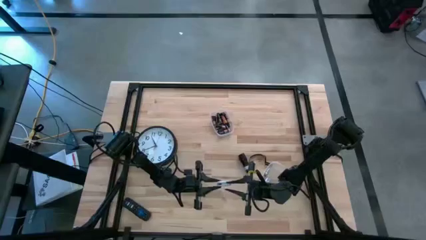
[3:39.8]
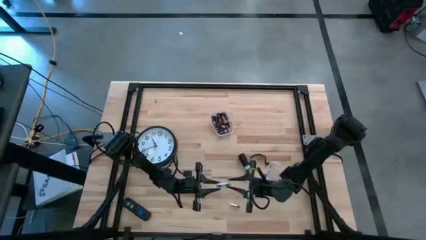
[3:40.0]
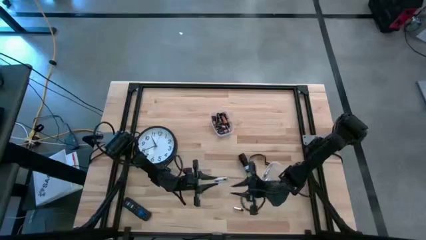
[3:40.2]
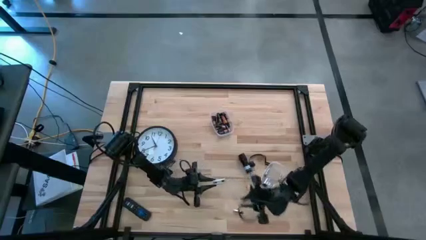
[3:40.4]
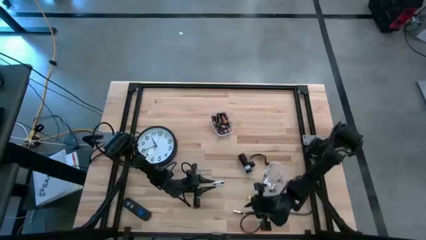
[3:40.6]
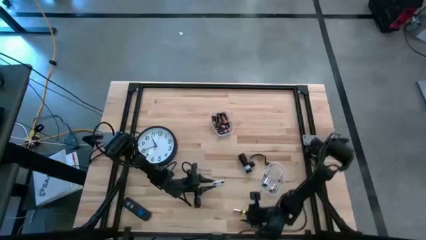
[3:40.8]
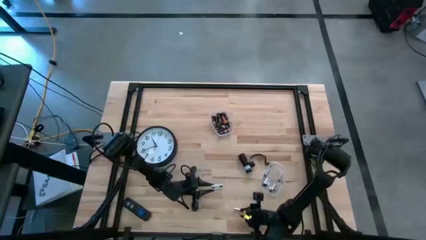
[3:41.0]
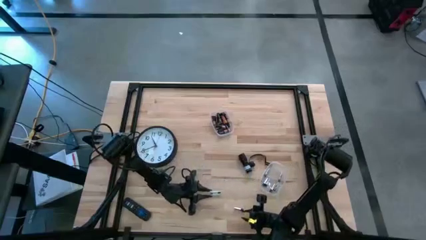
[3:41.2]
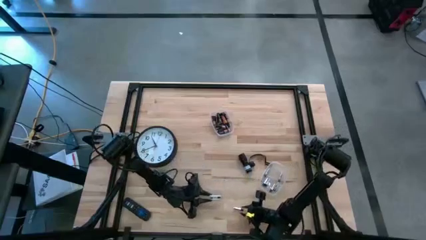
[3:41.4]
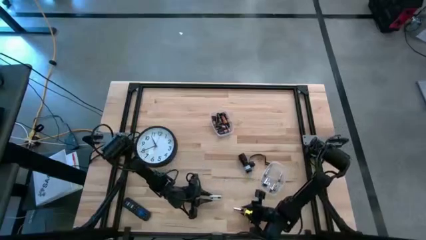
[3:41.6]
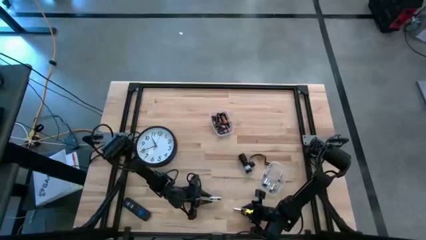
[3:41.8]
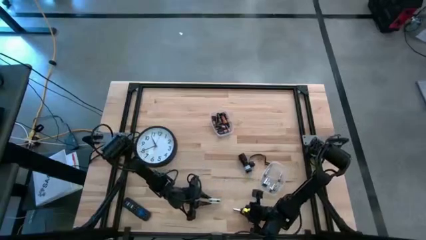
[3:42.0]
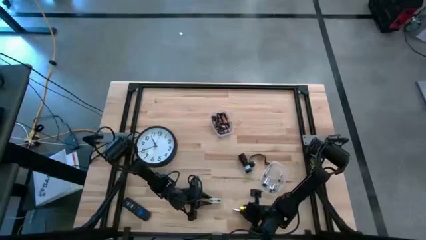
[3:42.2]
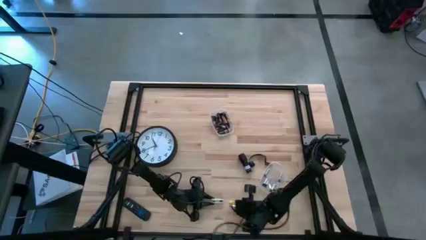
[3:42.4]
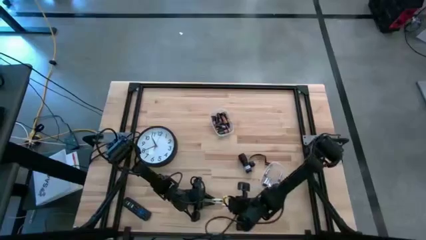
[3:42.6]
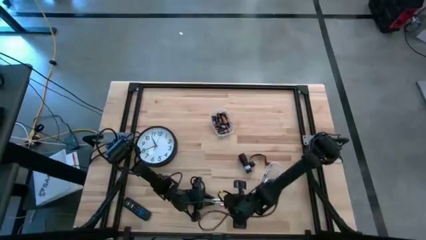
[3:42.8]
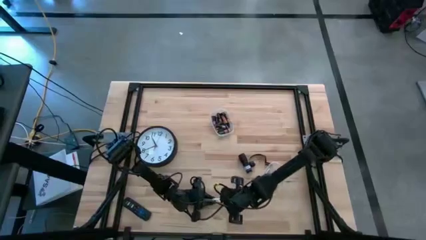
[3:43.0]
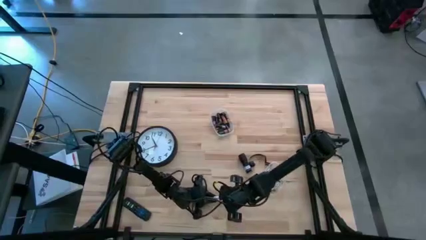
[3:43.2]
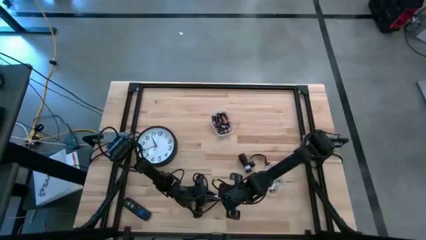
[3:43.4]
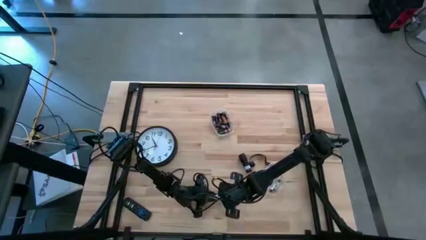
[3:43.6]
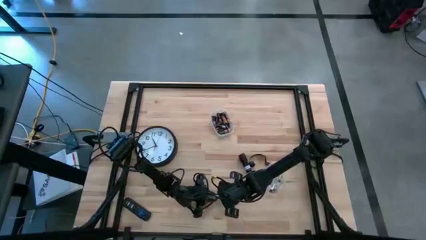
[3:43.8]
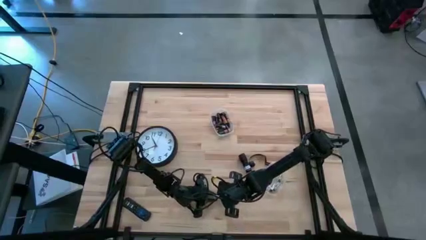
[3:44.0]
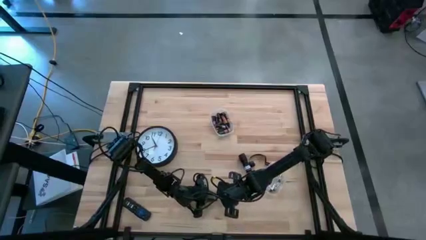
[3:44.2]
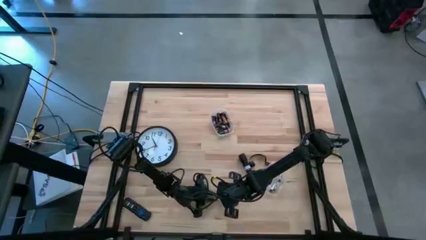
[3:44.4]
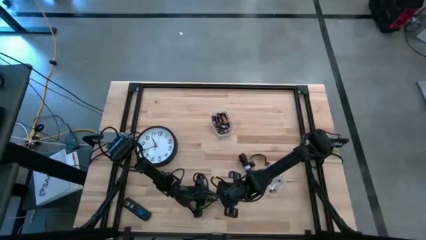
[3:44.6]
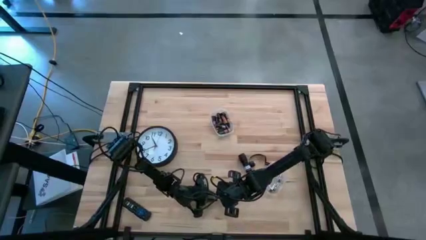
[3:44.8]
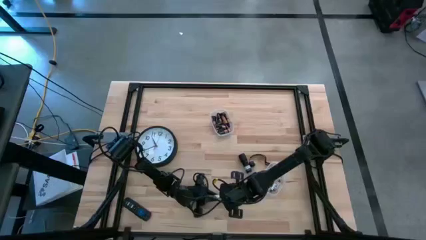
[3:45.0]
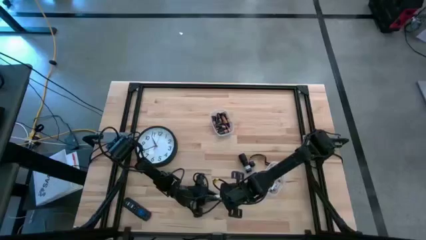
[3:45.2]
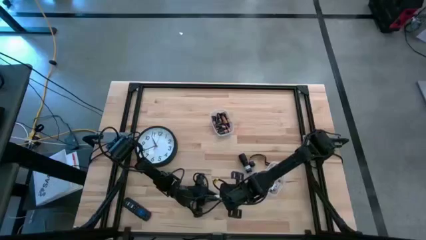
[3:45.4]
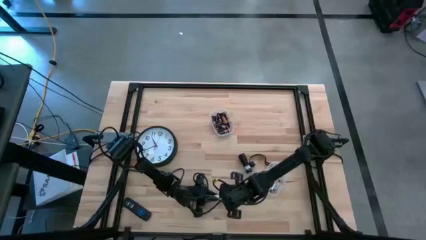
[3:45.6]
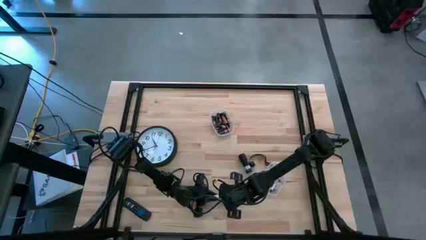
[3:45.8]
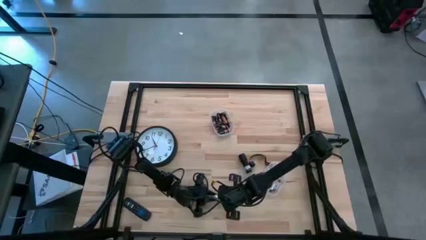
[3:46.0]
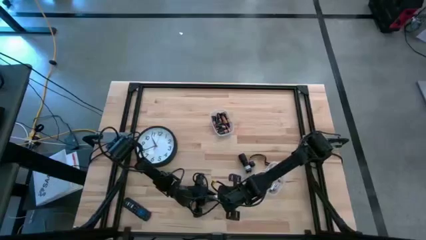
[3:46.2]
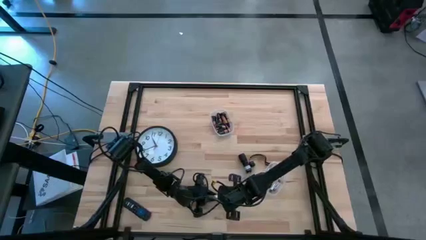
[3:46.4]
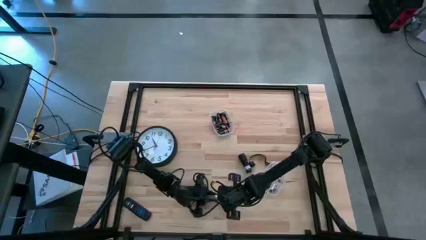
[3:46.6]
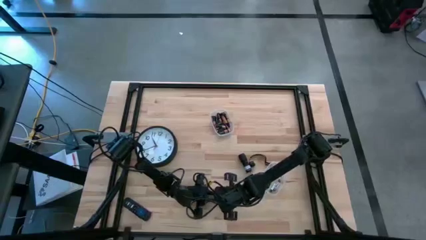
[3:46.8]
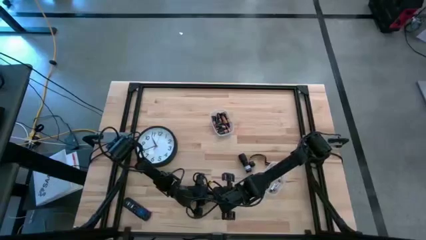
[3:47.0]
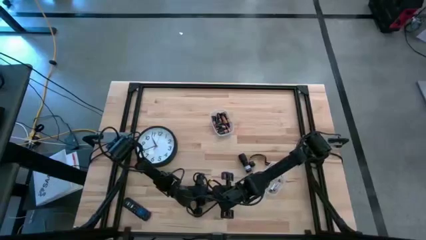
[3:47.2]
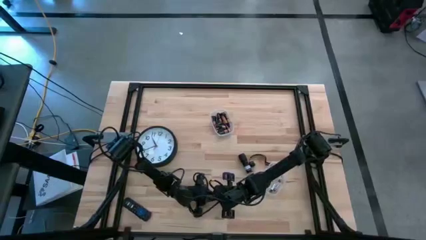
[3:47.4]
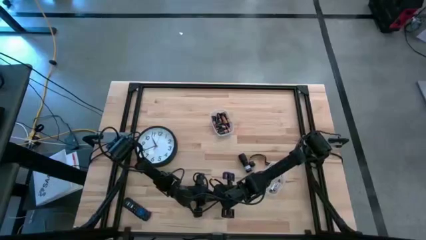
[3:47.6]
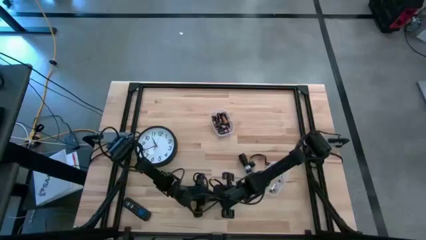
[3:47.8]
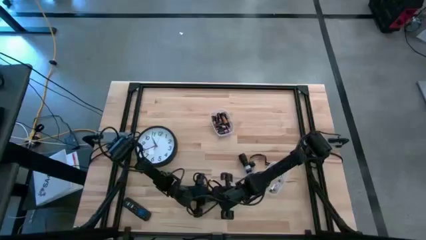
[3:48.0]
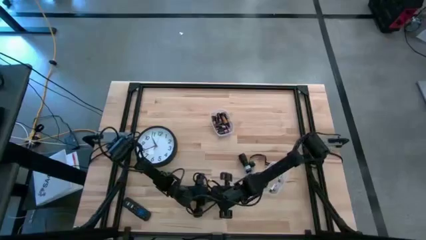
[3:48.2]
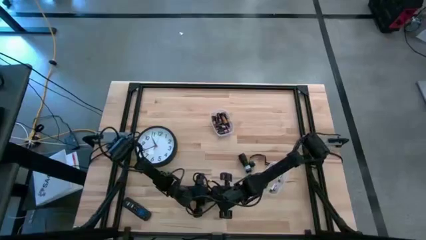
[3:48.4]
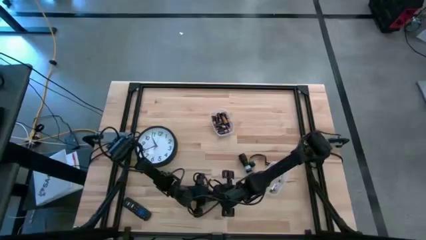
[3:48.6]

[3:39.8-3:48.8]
Task: Insert battery
Insert the silver battery into the battery holder

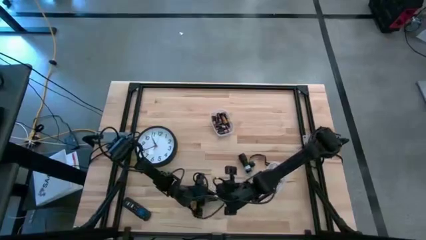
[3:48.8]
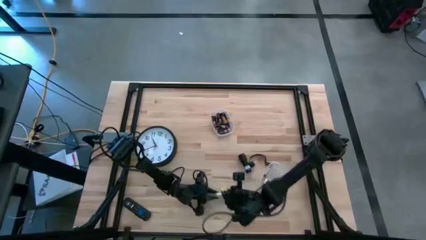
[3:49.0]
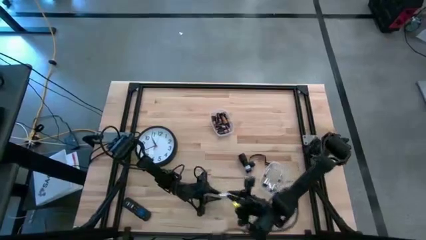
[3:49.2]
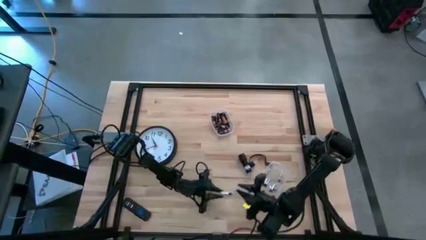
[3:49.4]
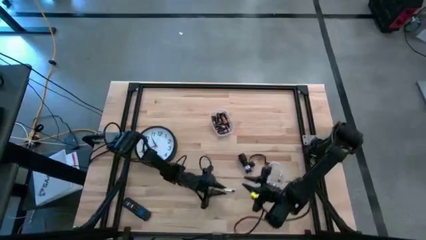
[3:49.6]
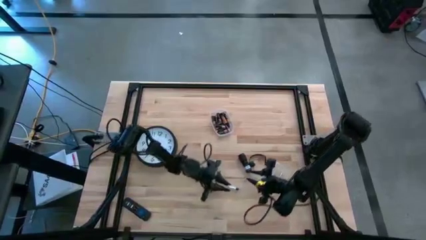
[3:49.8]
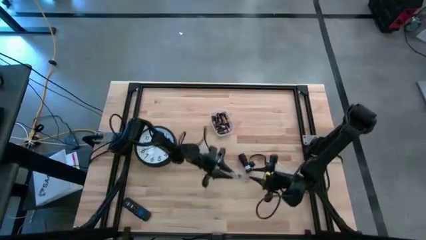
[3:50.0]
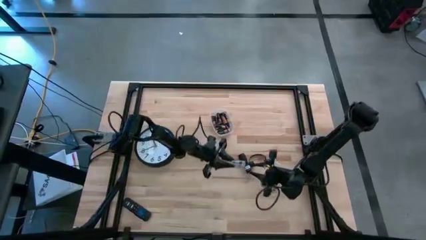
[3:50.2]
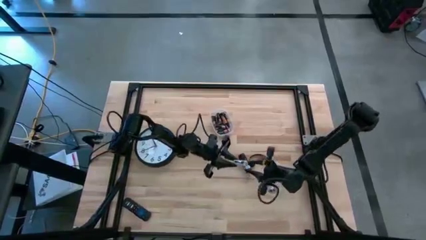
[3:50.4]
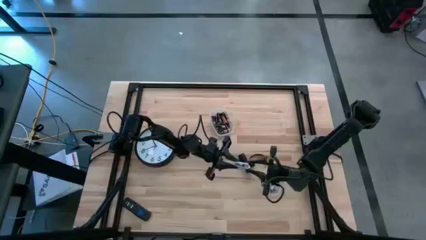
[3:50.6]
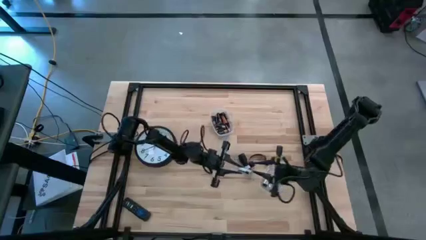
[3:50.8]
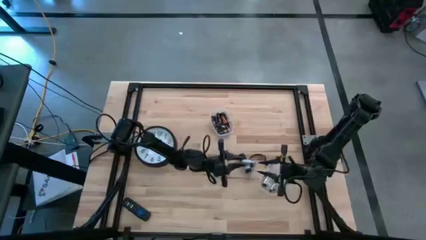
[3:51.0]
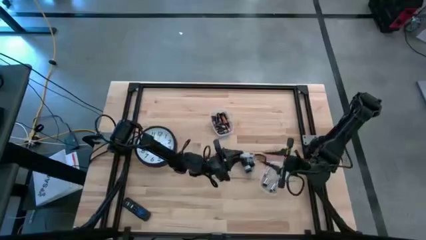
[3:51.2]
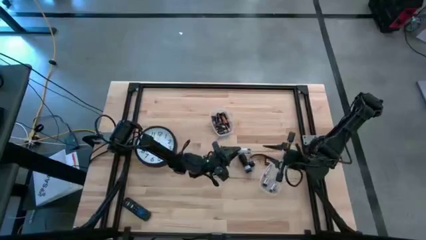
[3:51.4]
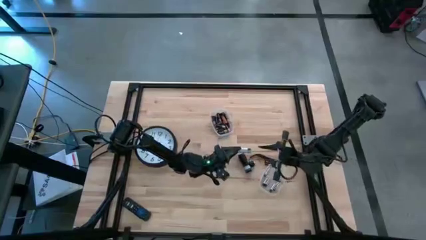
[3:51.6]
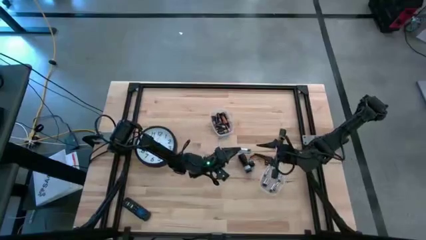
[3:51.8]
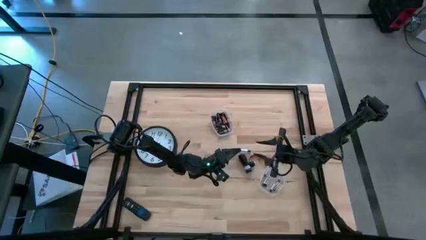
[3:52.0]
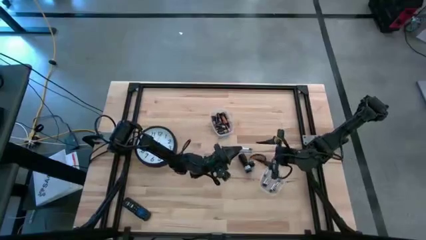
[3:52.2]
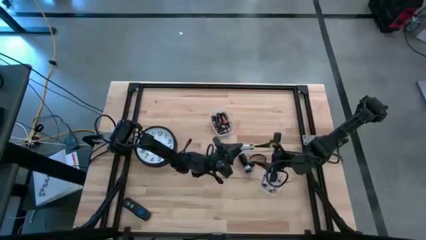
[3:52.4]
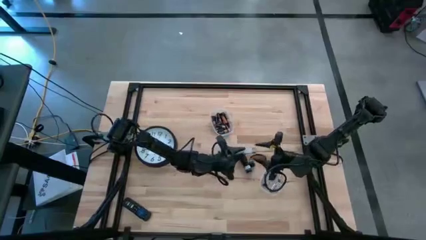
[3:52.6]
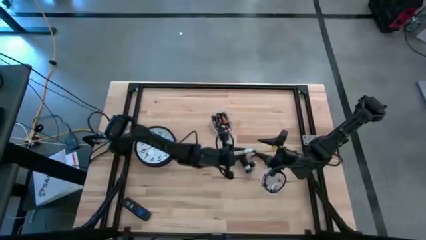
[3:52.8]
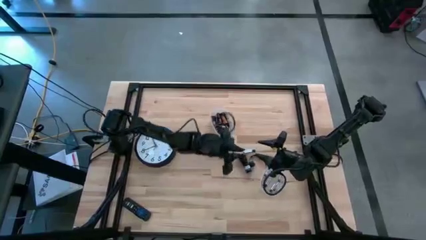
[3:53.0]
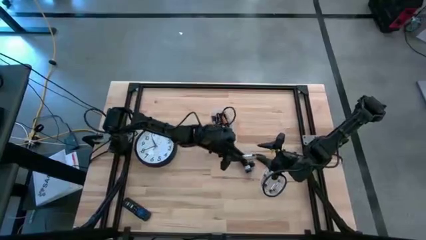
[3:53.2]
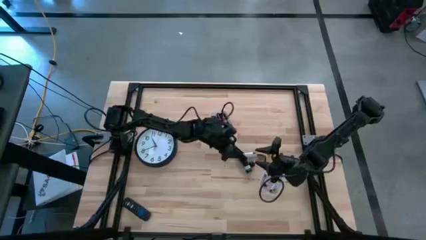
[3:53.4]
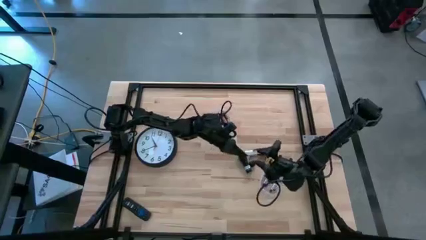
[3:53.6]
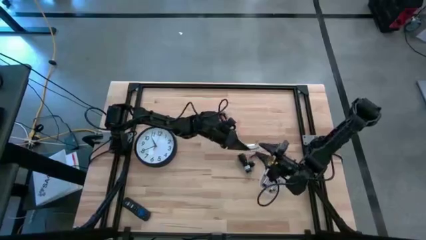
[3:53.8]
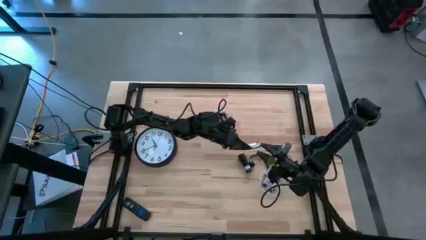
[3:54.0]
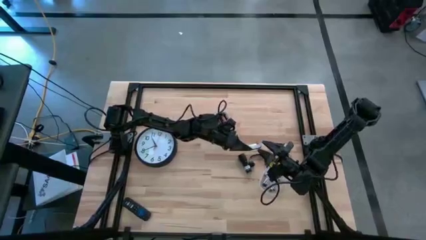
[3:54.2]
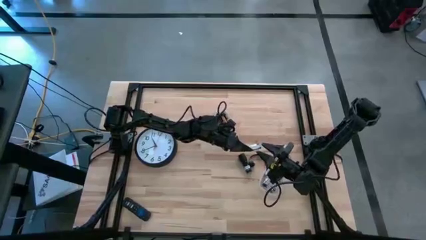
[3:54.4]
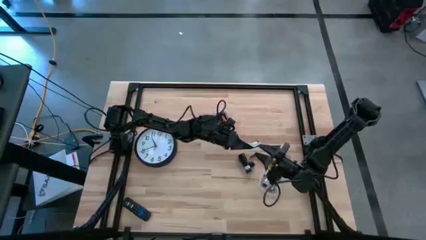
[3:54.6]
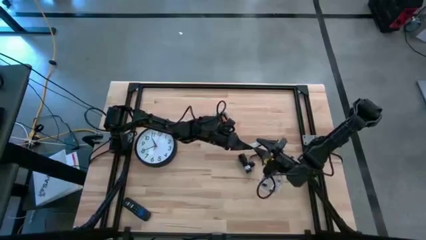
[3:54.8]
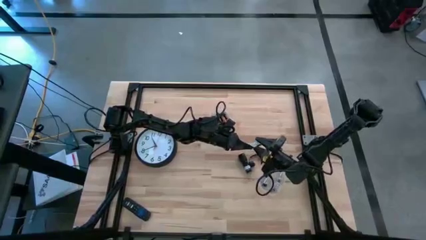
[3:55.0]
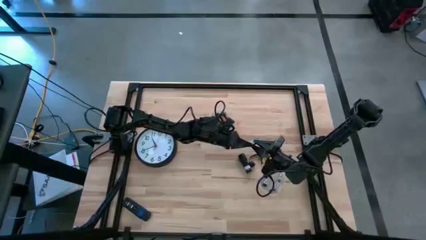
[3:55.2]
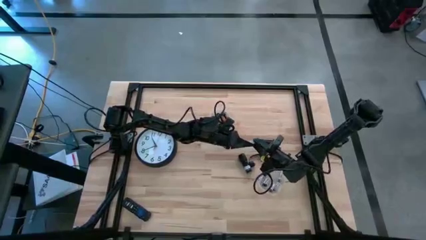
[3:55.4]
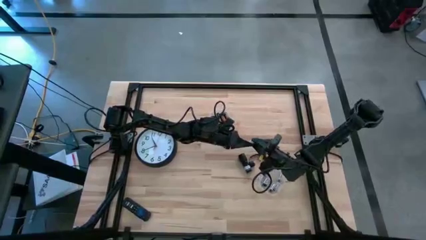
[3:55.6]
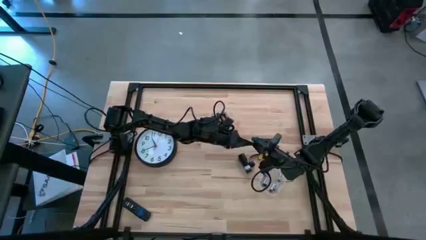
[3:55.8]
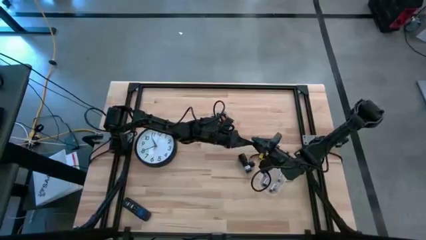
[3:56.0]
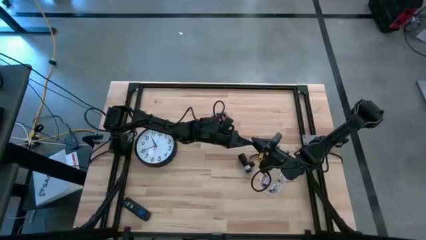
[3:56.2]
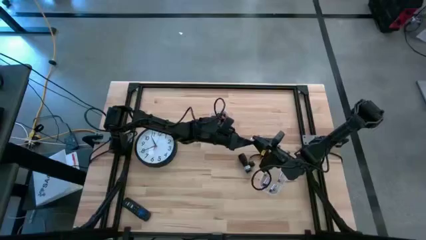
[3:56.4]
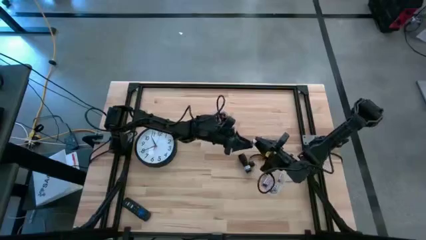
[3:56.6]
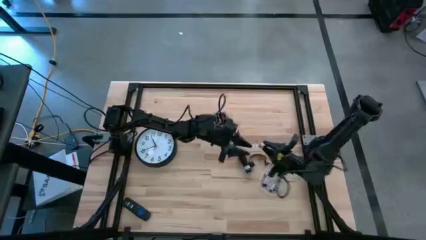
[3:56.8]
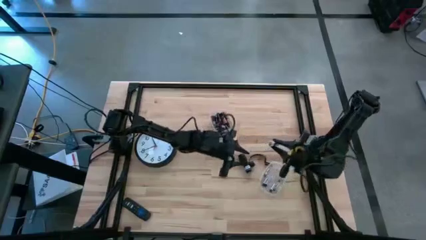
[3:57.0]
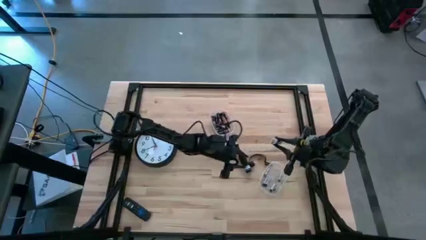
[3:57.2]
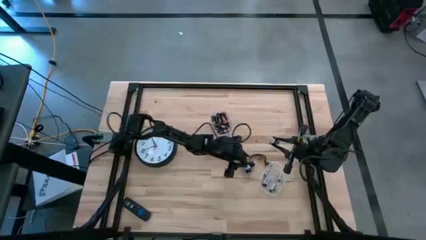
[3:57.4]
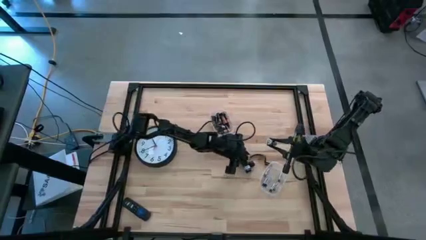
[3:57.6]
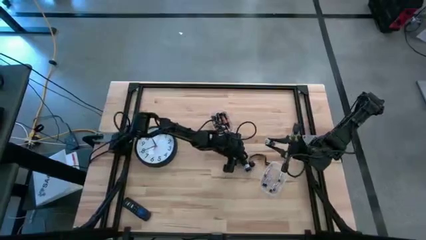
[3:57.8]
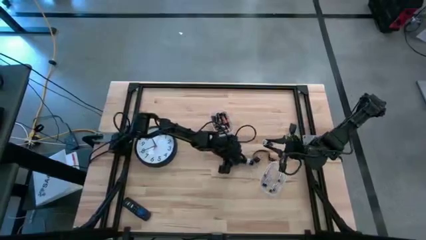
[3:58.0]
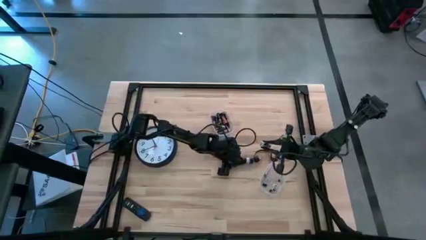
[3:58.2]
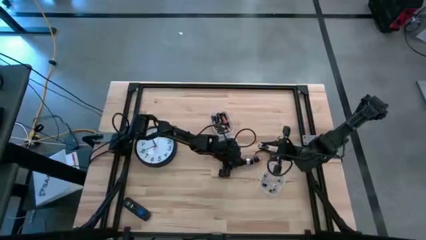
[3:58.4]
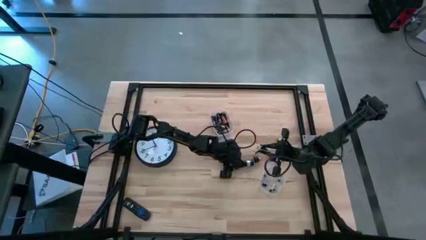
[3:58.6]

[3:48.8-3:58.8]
Insert the battery holder into the black flashlight
